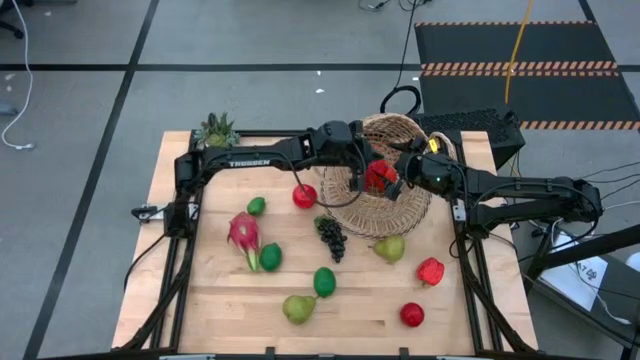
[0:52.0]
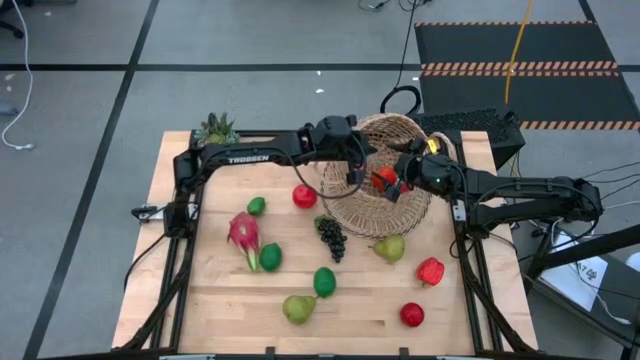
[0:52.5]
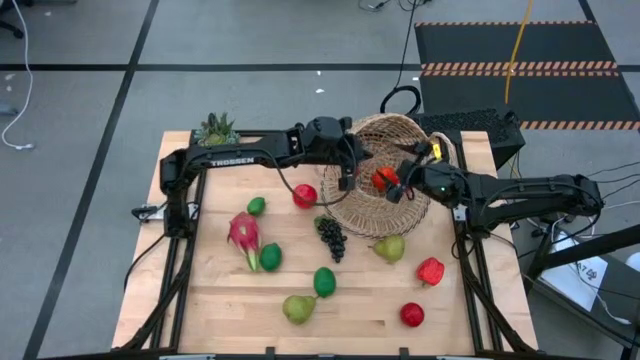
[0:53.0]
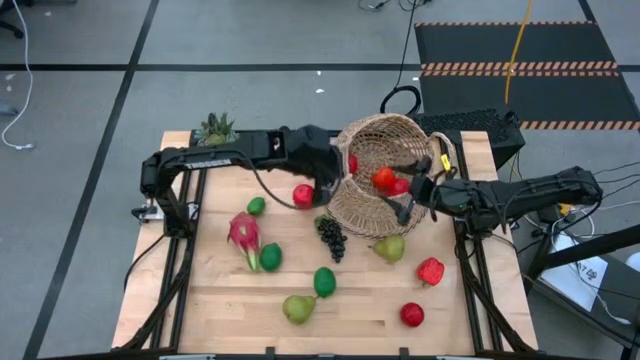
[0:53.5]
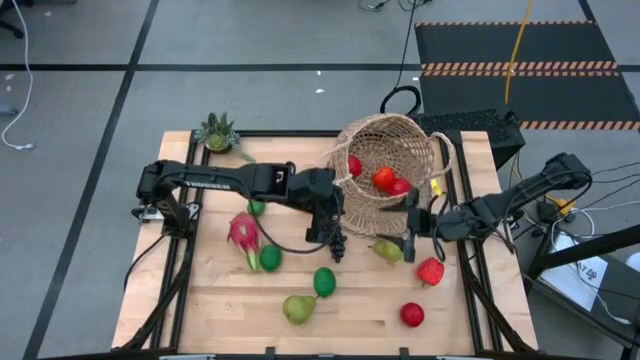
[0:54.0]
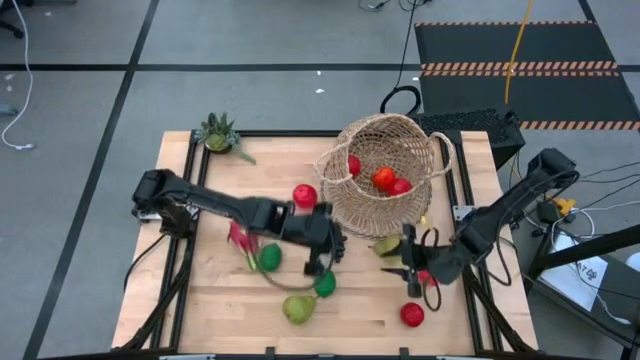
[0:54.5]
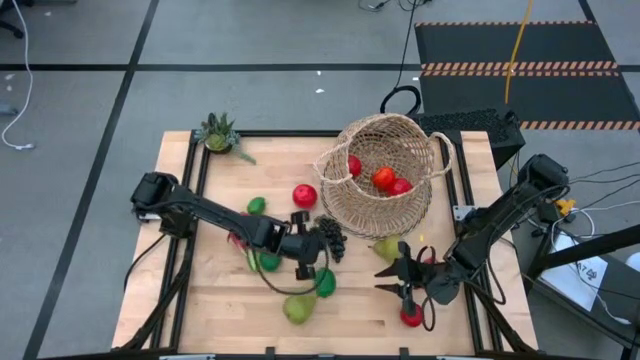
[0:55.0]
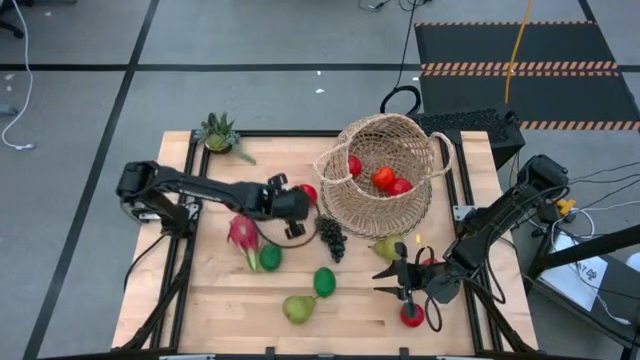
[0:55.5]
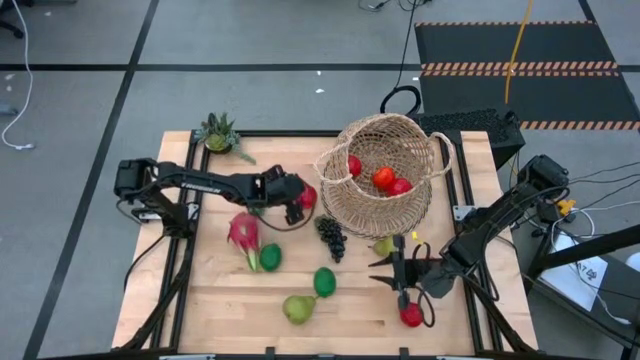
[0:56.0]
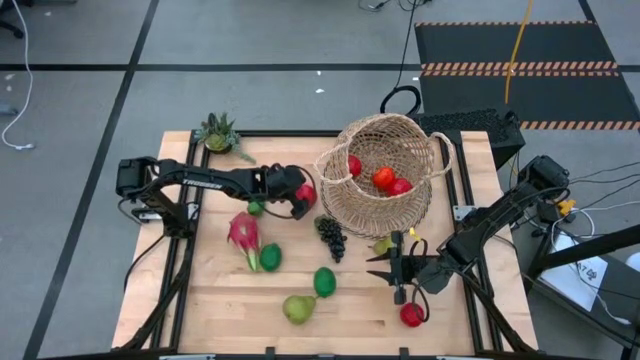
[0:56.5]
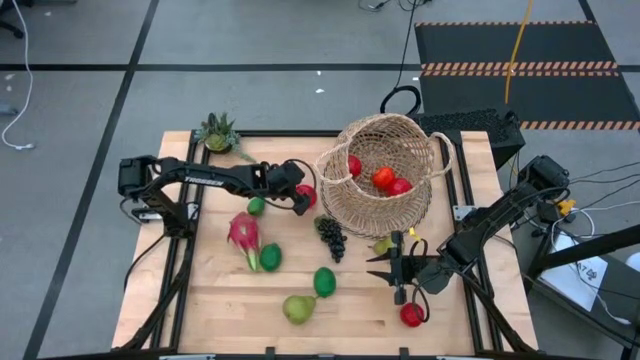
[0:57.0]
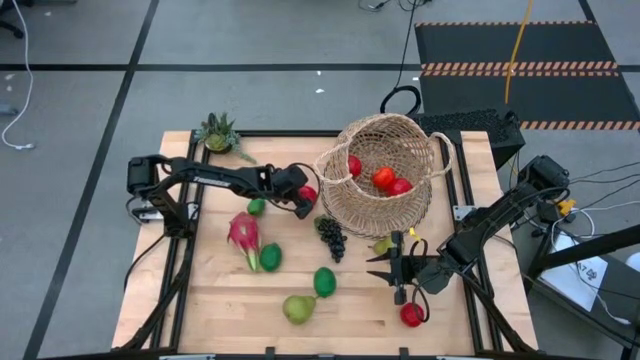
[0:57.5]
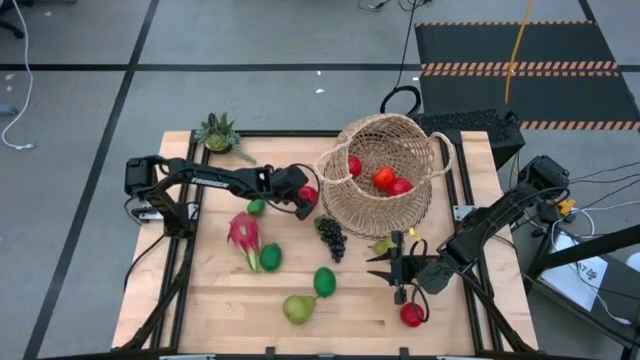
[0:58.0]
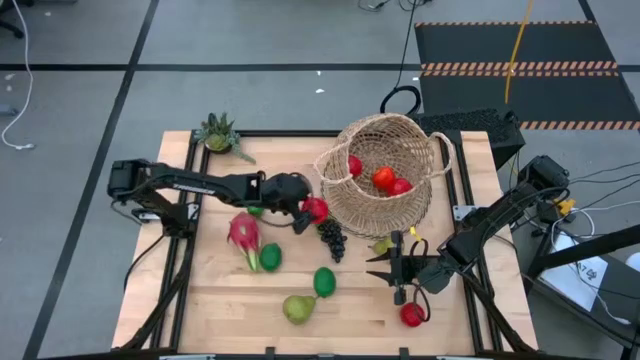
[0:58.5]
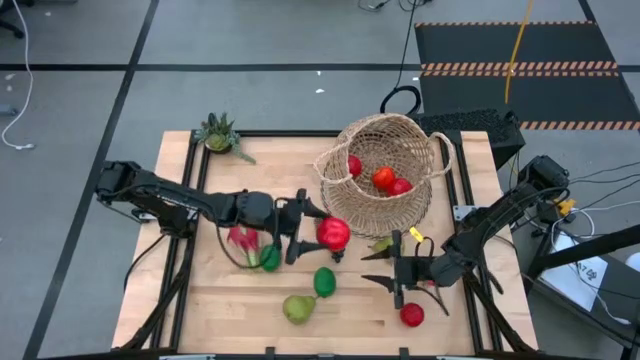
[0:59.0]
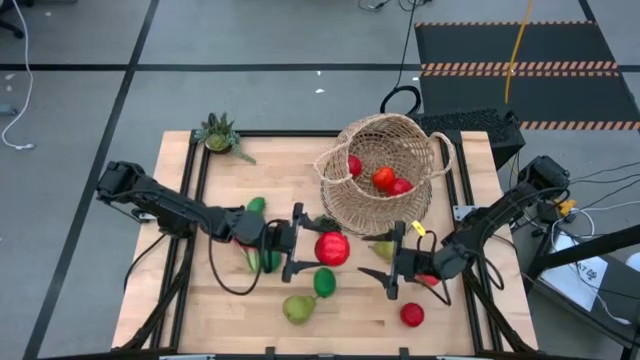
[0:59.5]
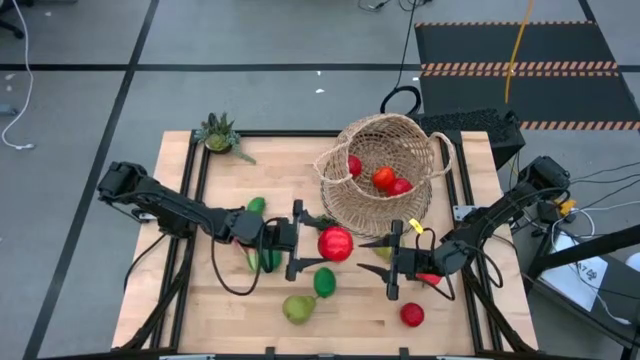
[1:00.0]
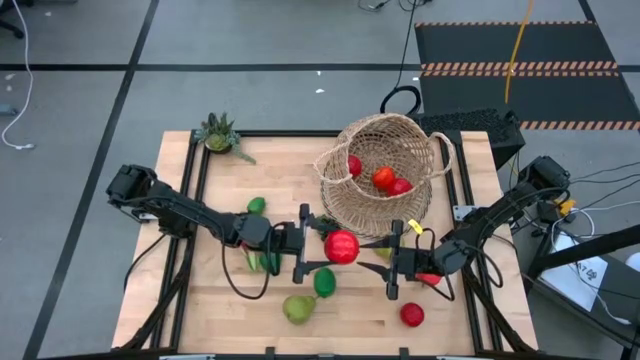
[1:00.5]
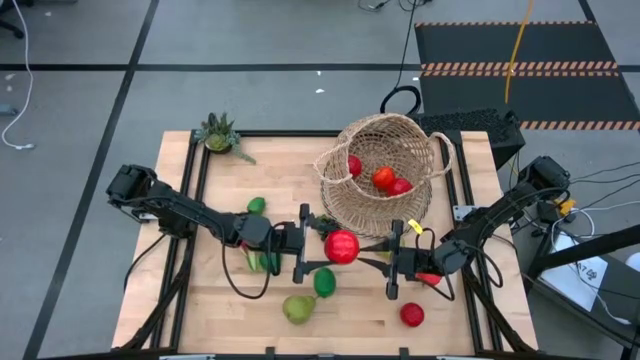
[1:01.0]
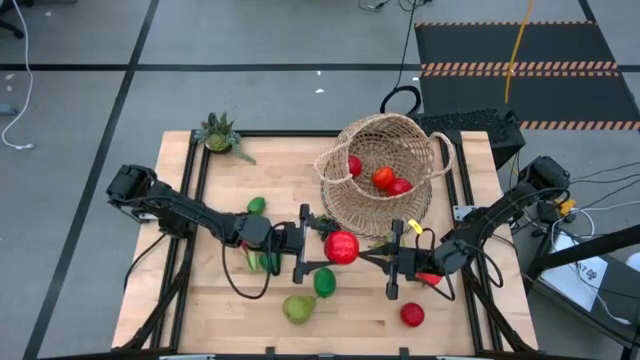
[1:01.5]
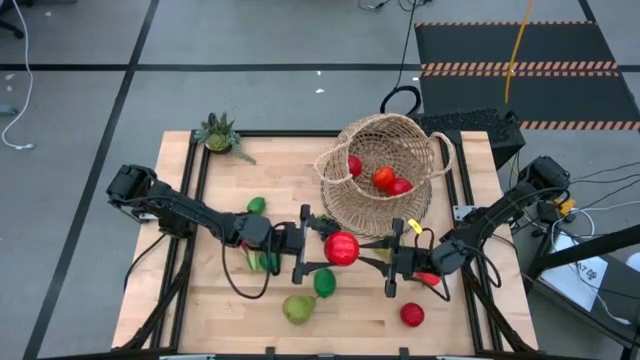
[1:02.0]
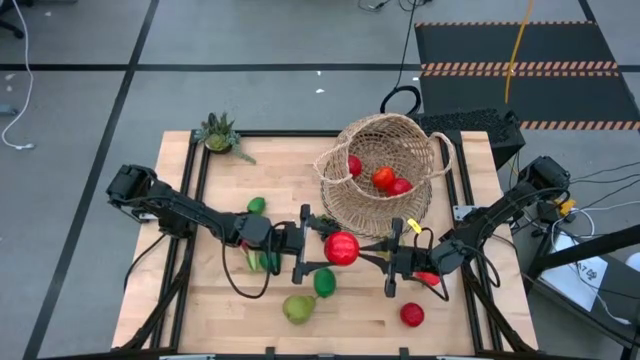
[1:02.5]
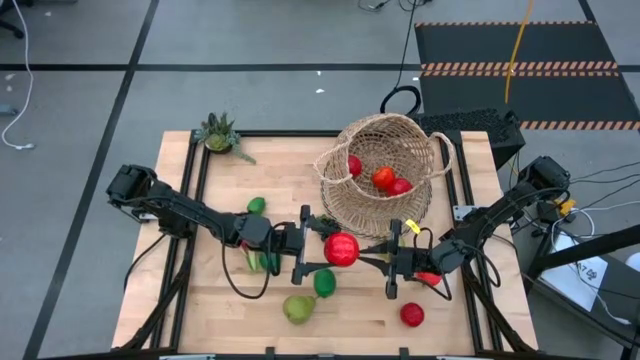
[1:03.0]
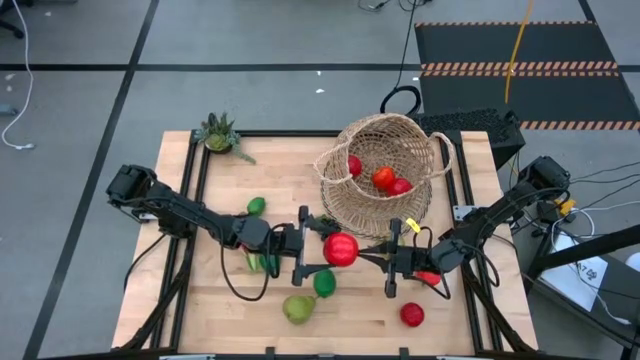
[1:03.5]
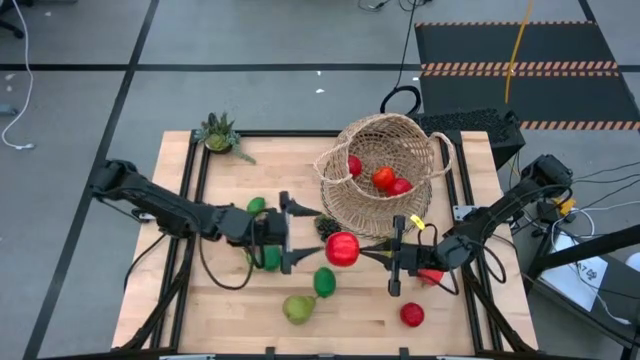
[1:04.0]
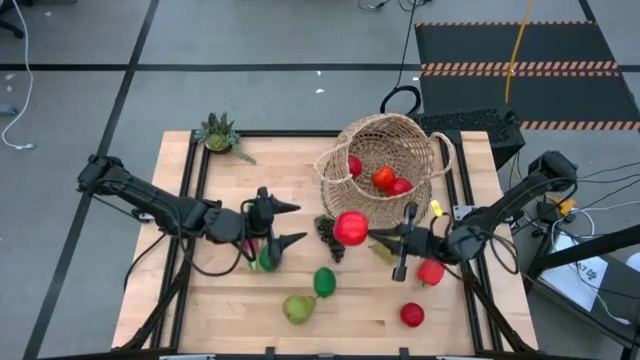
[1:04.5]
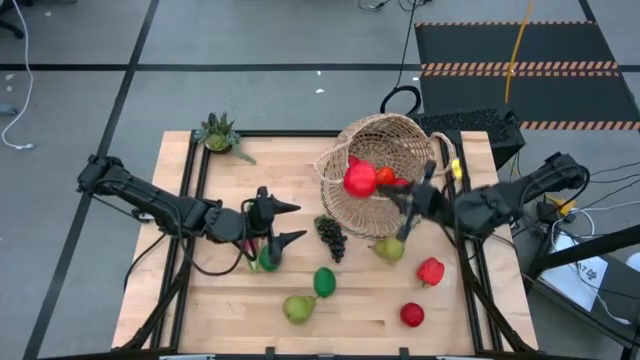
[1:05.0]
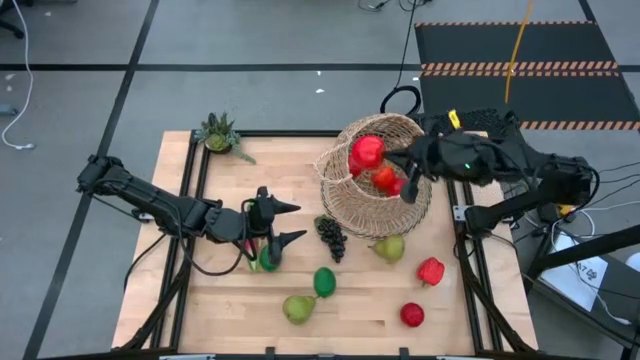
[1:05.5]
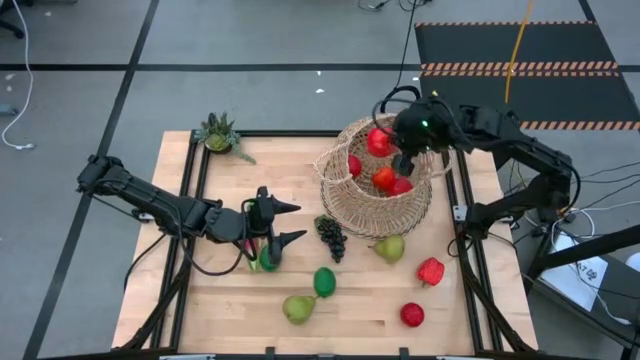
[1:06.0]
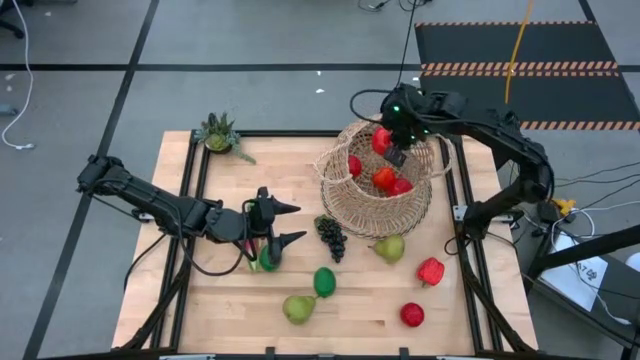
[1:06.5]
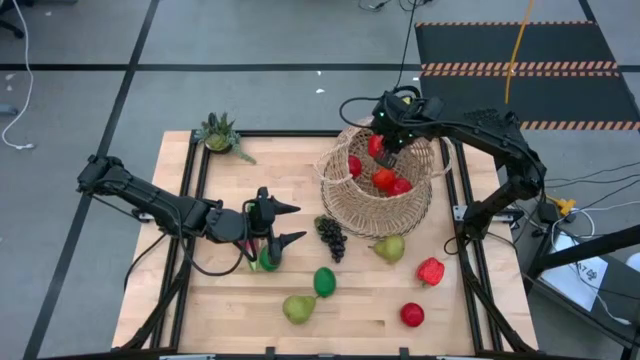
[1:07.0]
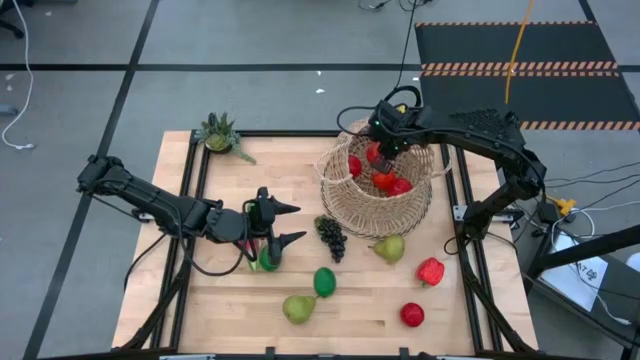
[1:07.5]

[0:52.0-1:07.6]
Task: Build produce basket
Put the red apple into the brown basket

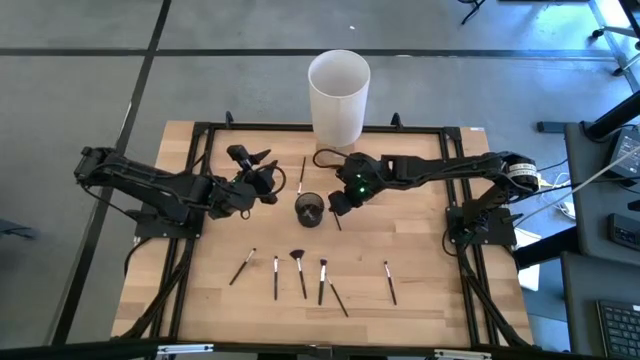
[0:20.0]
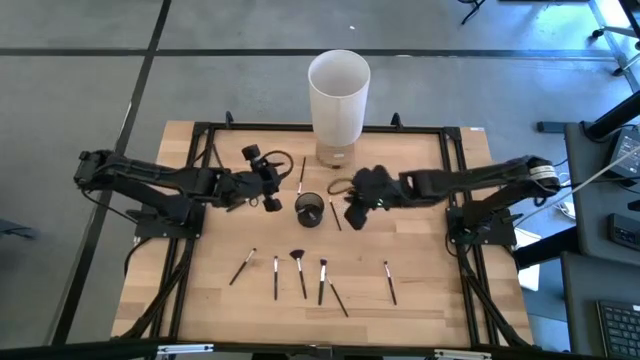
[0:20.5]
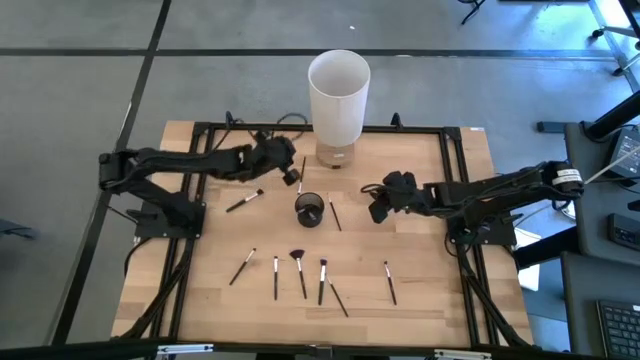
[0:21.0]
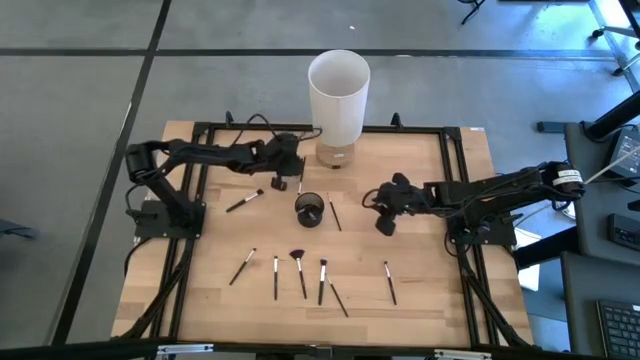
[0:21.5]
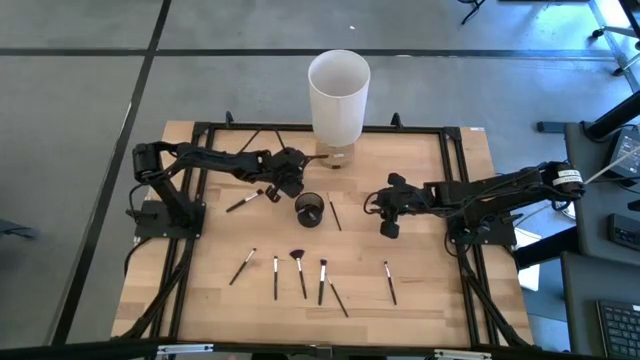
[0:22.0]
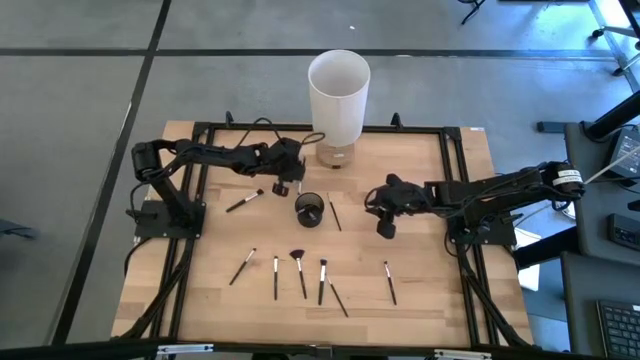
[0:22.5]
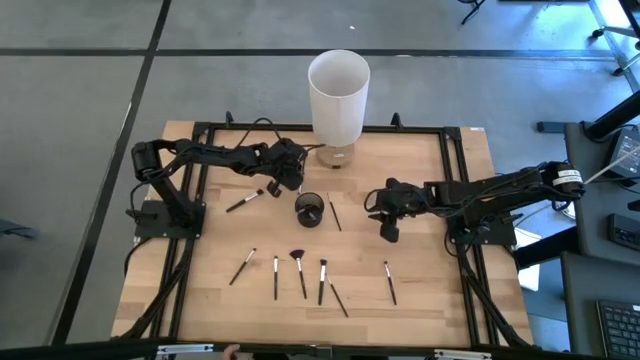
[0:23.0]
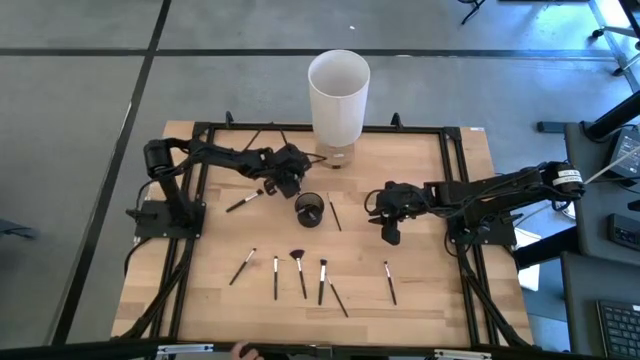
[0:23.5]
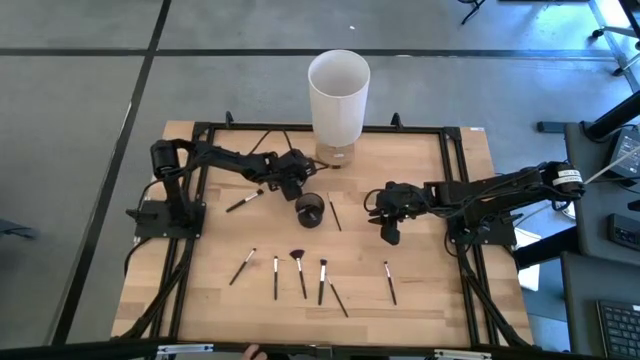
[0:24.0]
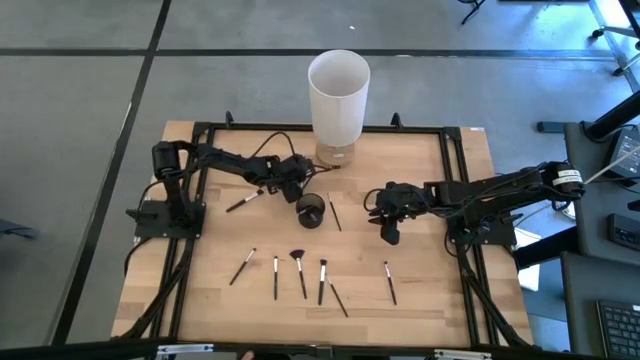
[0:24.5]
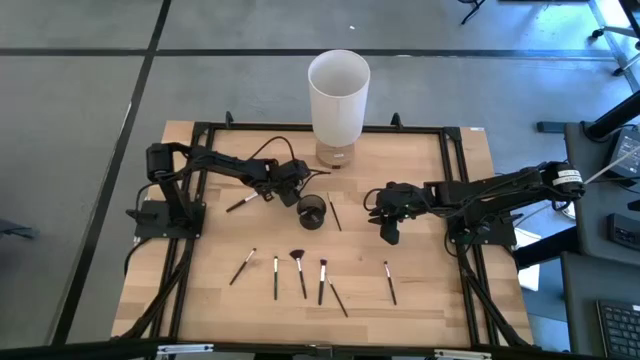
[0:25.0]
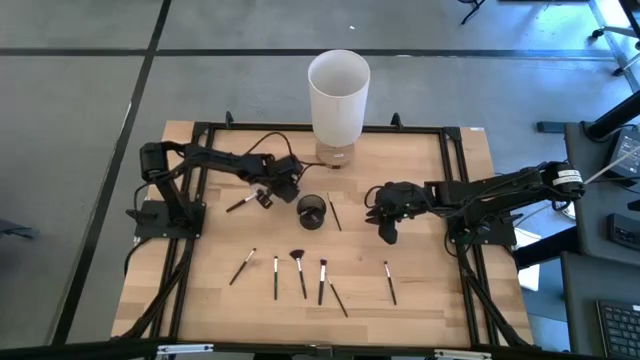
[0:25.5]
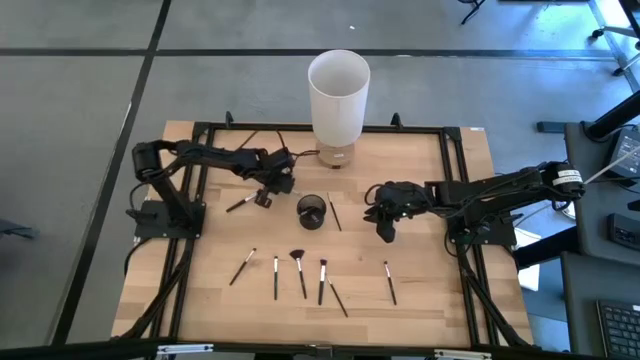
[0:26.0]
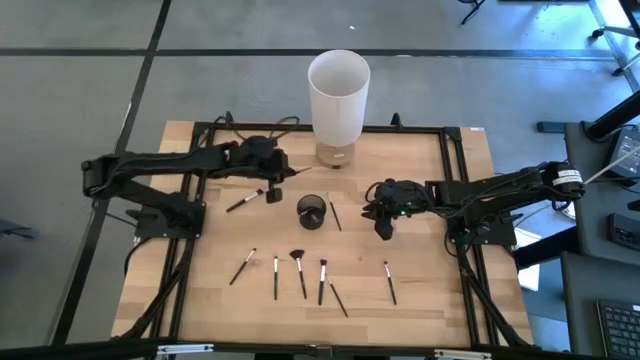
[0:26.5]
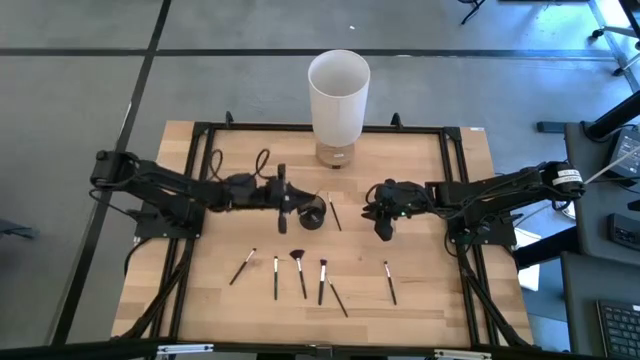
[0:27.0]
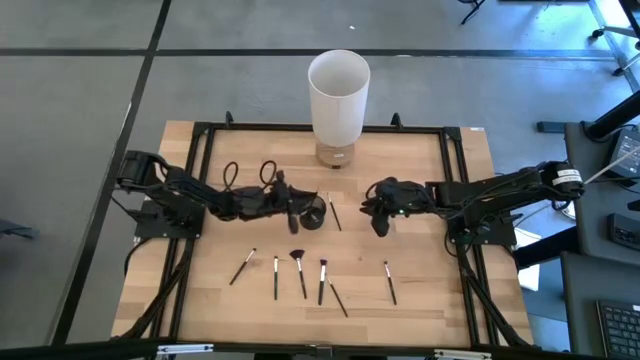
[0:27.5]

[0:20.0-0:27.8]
Task: Put items in baskets/containers
Put the black eyeshadow brush into the black pen holder
